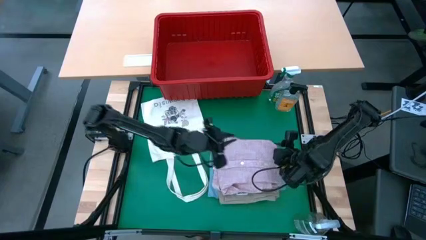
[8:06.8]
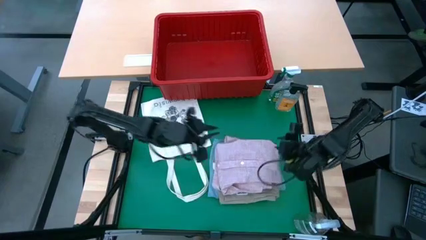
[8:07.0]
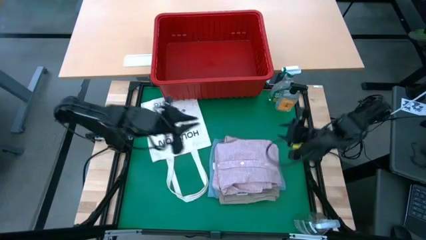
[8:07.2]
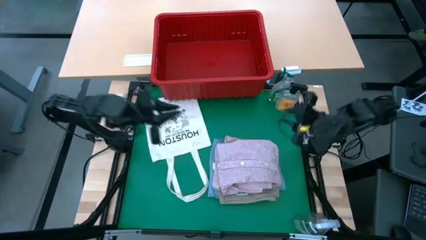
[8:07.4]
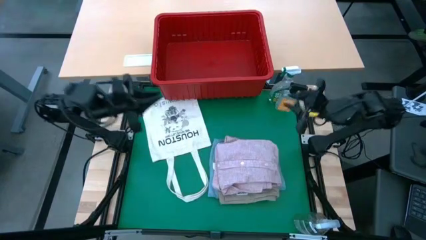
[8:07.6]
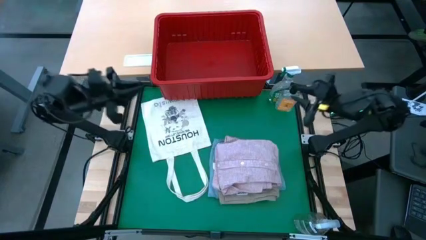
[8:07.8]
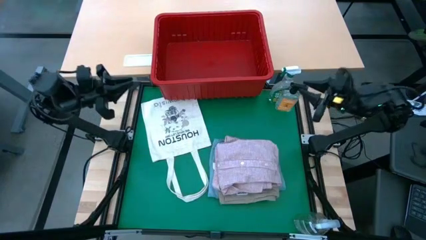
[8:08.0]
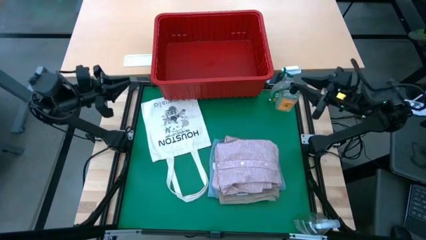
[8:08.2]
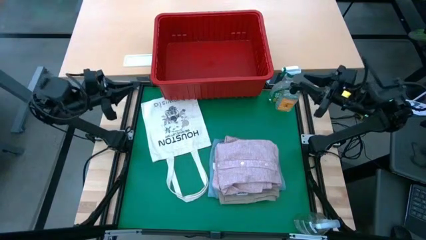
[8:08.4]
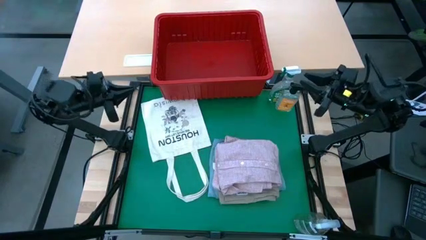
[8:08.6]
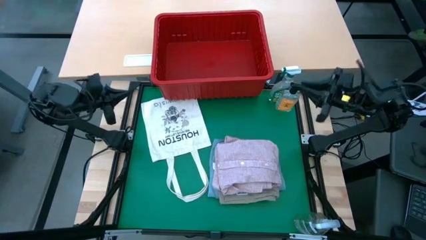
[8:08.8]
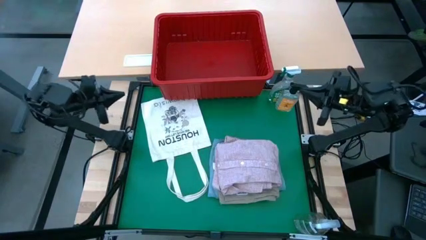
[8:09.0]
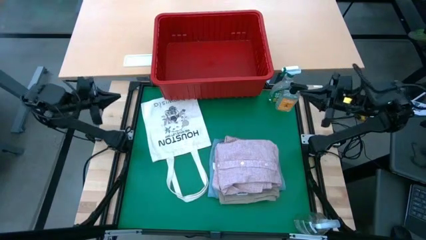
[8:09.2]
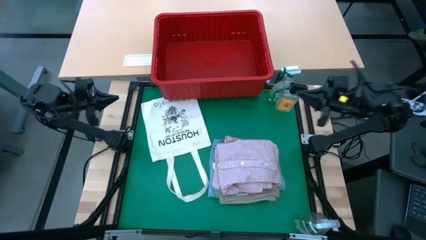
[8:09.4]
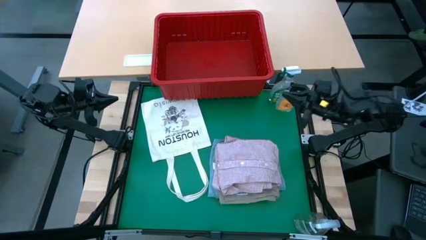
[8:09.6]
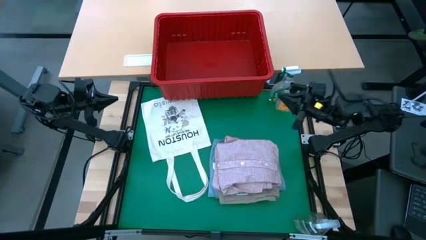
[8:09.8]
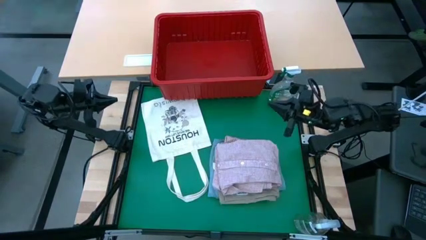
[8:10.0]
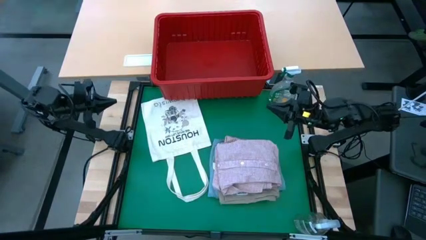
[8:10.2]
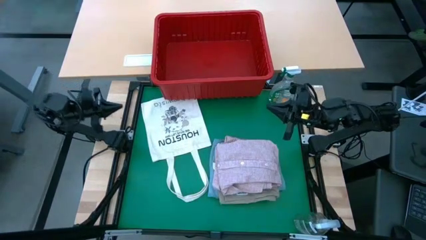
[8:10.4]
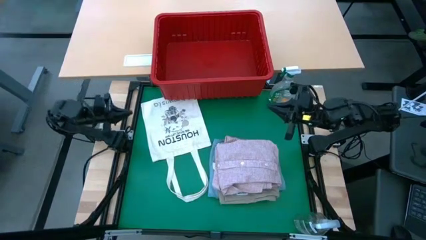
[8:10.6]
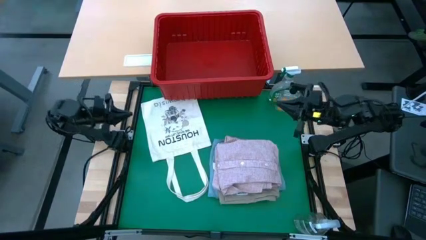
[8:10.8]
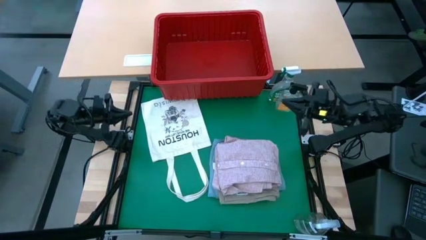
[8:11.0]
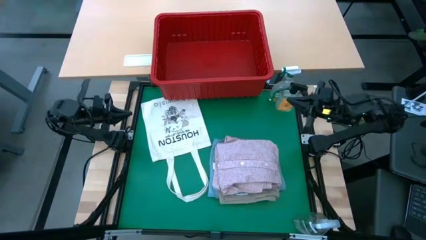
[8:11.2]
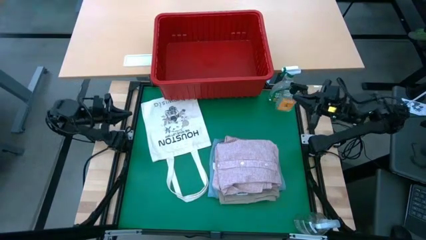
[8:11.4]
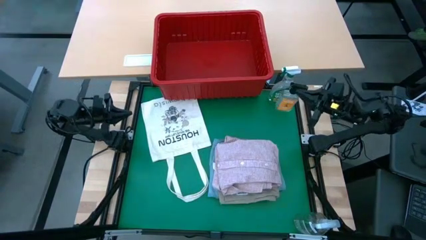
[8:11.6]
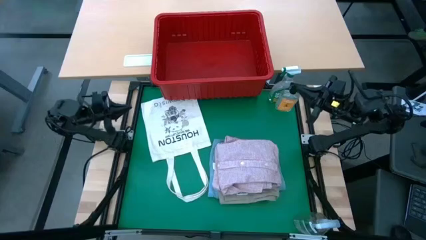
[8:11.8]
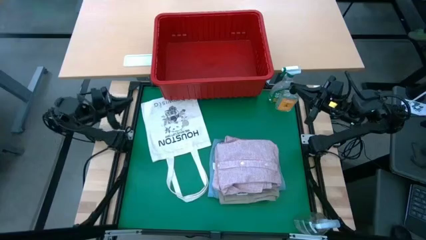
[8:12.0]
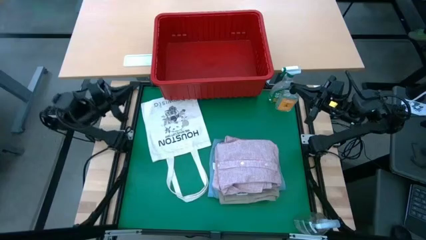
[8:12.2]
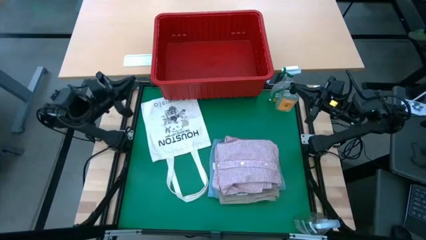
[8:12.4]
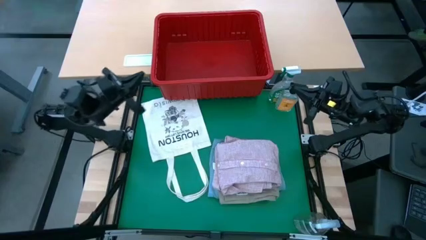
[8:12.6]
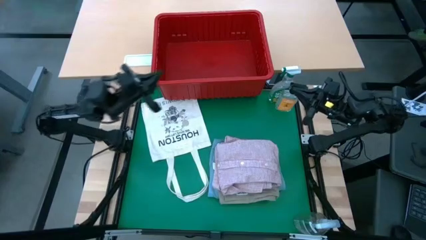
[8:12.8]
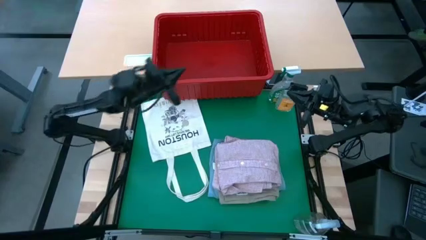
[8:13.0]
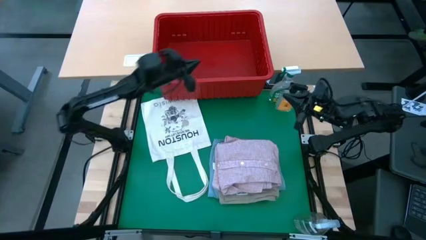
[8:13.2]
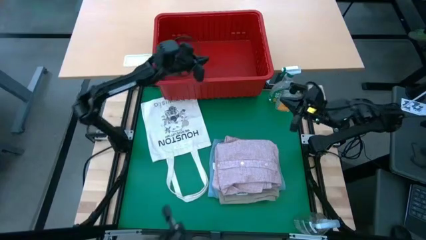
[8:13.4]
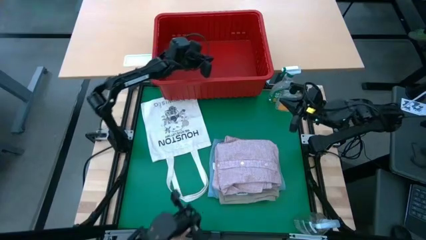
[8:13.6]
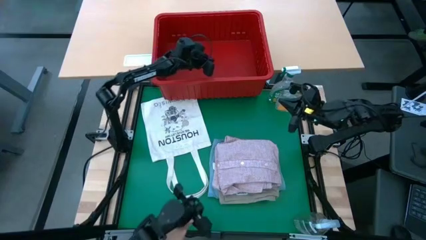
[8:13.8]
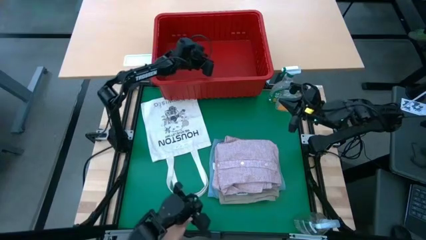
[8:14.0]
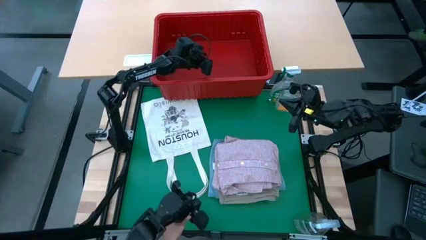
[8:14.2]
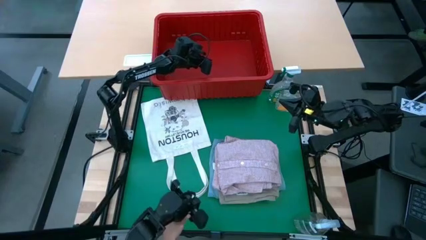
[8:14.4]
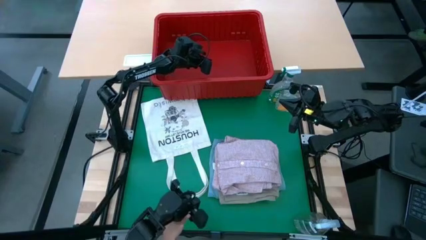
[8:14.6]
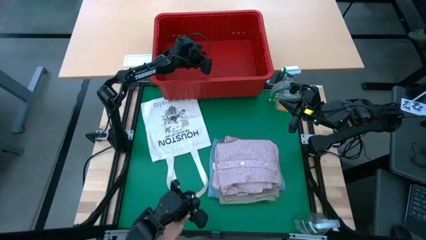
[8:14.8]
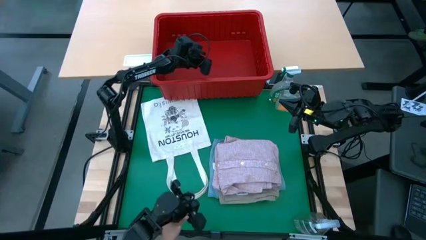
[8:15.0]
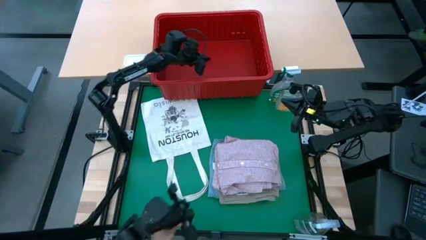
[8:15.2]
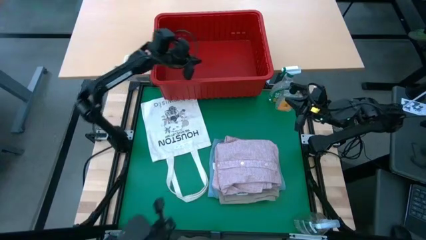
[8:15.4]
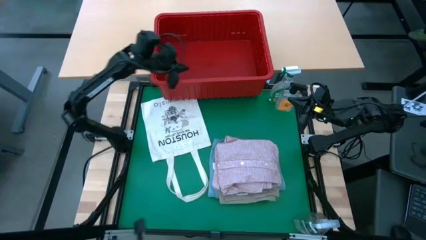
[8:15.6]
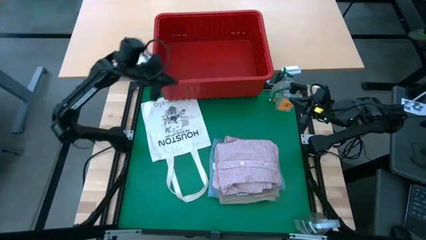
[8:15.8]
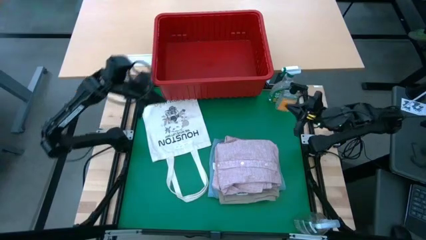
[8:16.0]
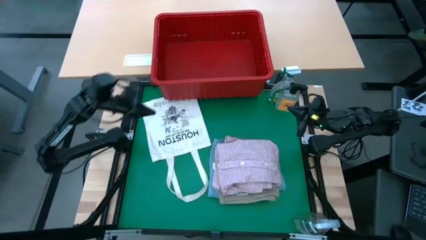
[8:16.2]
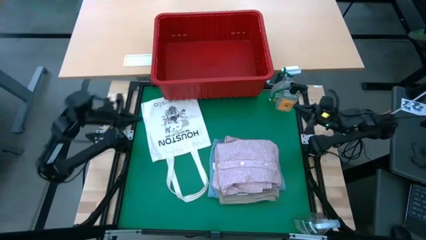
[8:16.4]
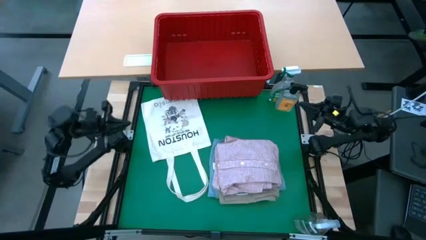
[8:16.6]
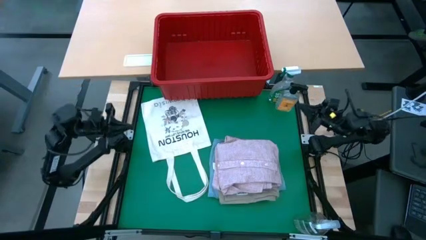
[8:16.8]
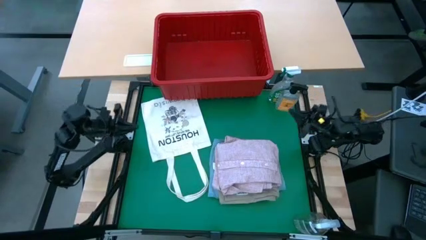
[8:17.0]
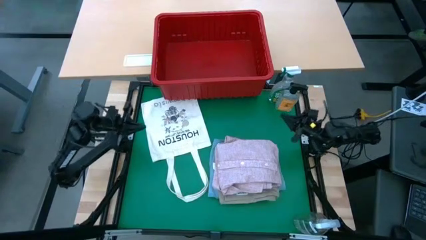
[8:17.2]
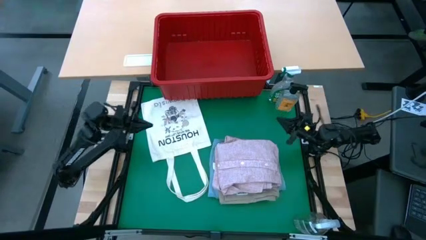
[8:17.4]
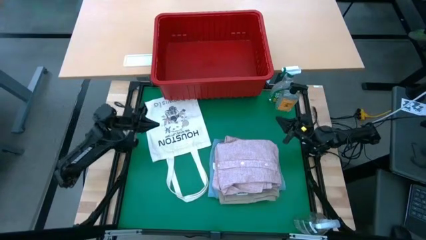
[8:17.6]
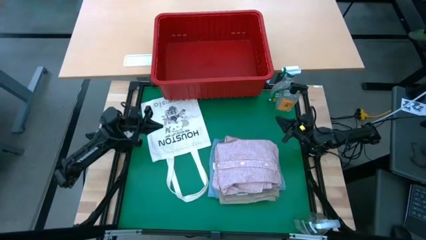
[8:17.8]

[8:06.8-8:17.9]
Task: Fold laundry
Return to Home Position
